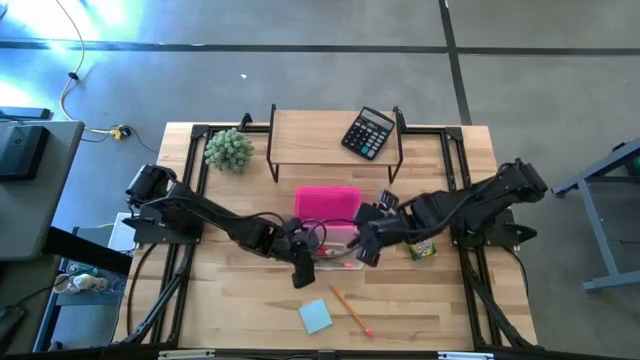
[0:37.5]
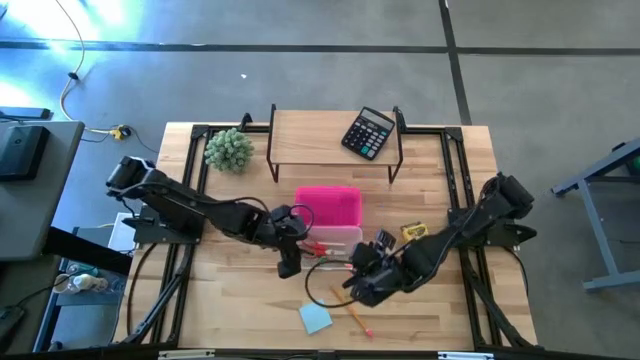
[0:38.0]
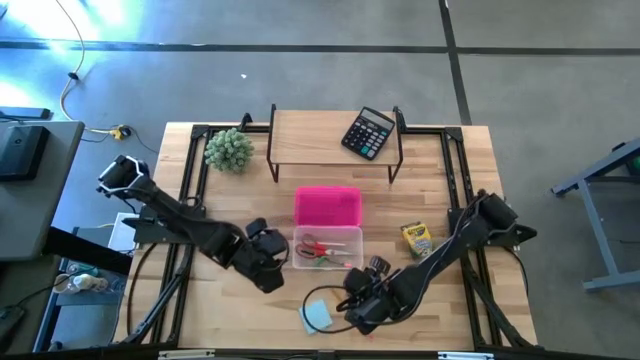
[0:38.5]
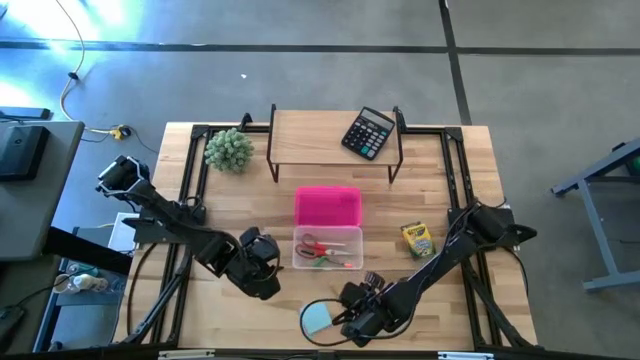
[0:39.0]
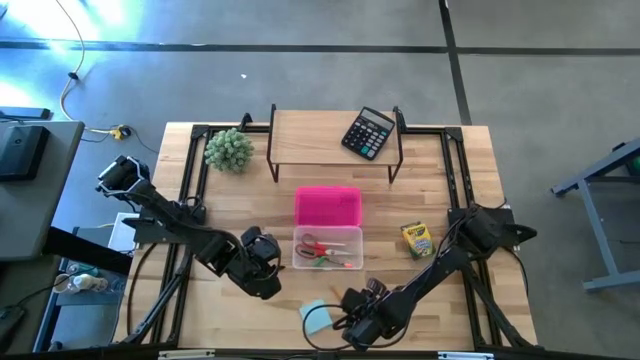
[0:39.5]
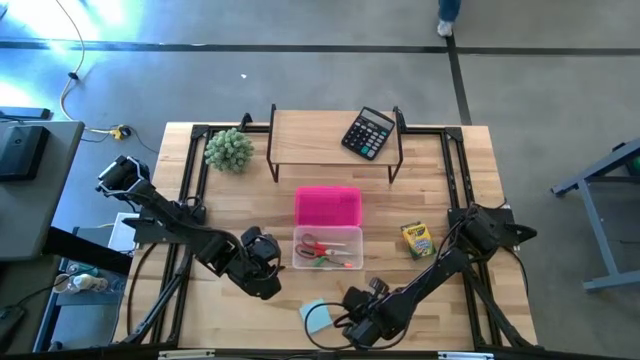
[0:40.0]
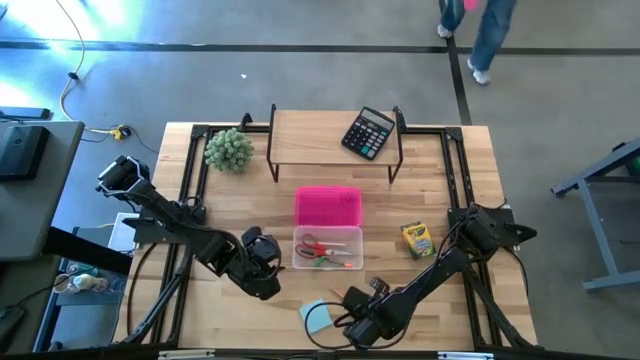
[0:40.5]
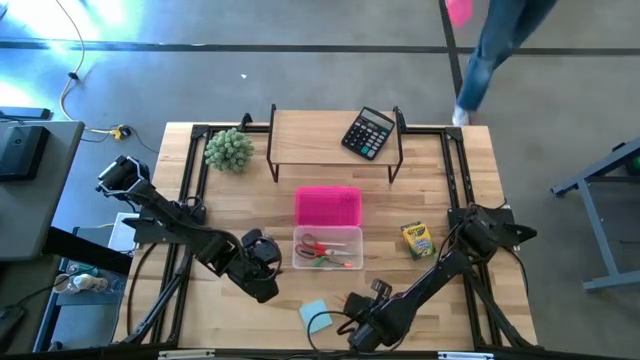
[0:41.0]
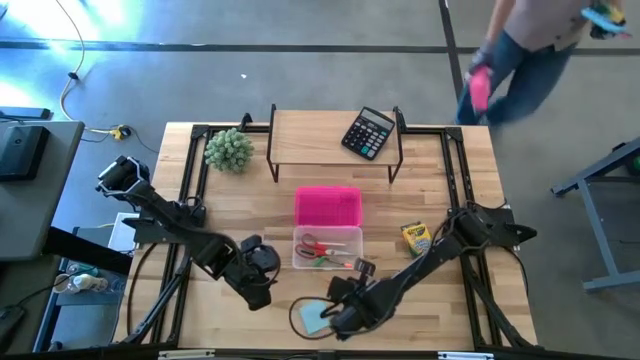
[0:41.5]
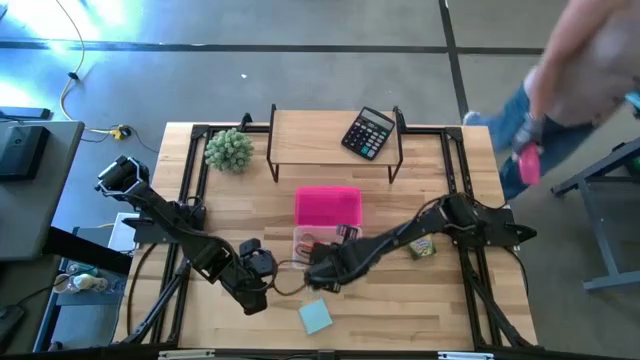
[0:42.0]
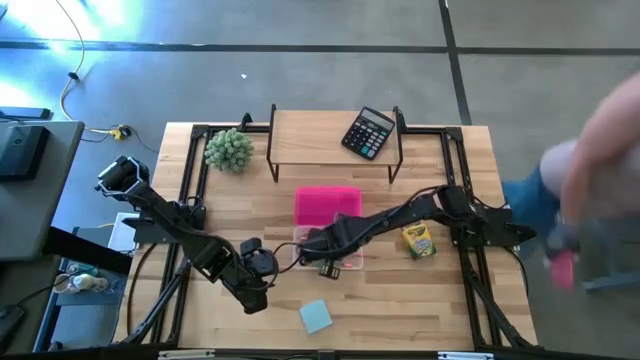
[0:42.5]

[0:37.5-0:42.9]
Task: Pack school essentials
Put the orange pencil into the supply box

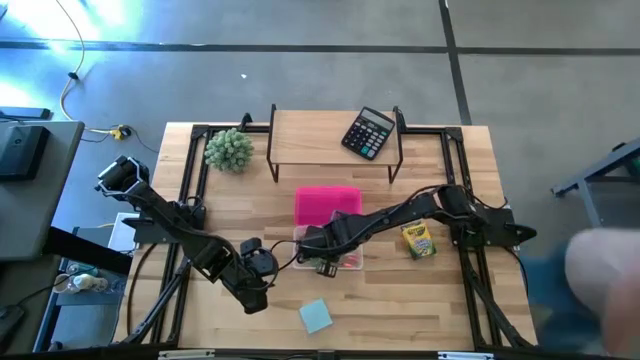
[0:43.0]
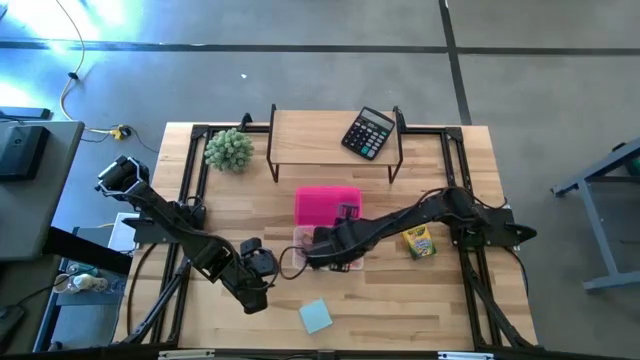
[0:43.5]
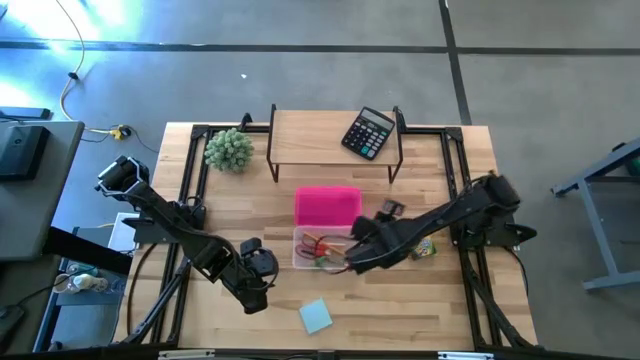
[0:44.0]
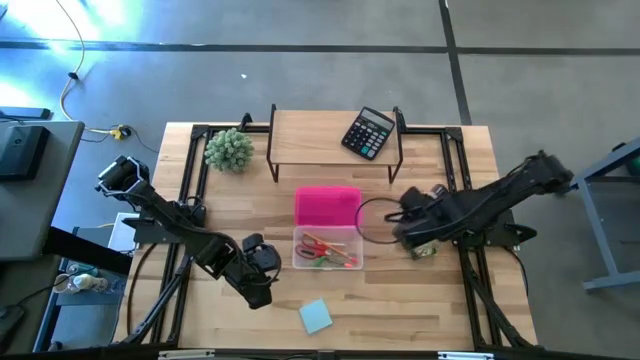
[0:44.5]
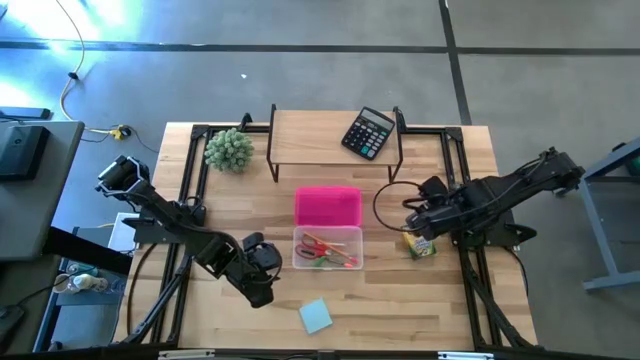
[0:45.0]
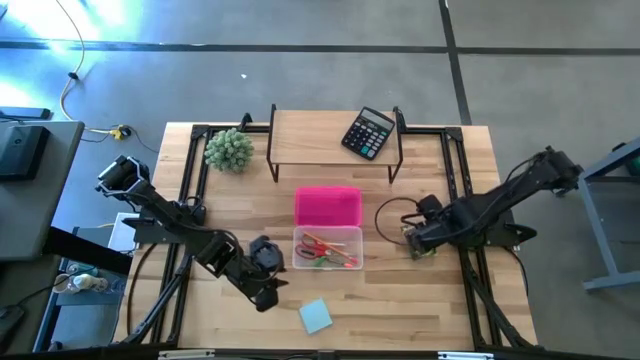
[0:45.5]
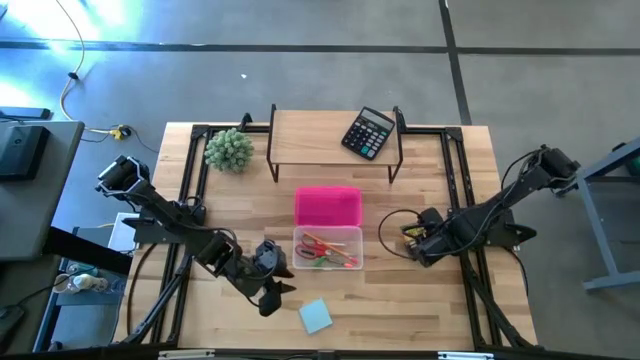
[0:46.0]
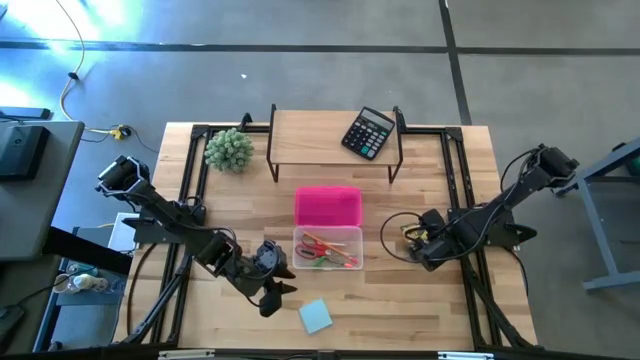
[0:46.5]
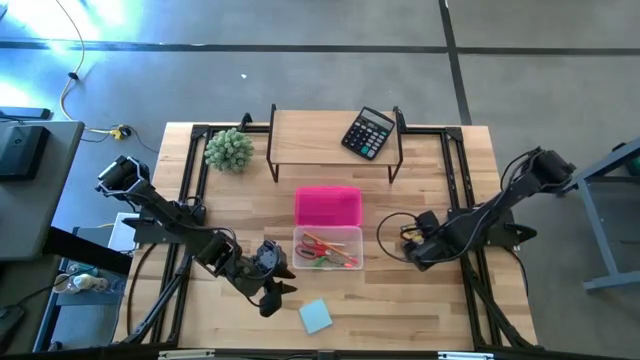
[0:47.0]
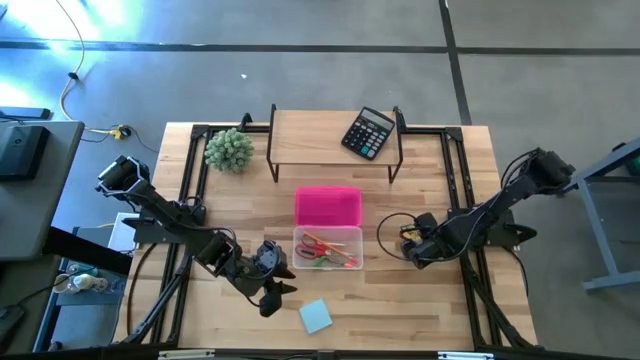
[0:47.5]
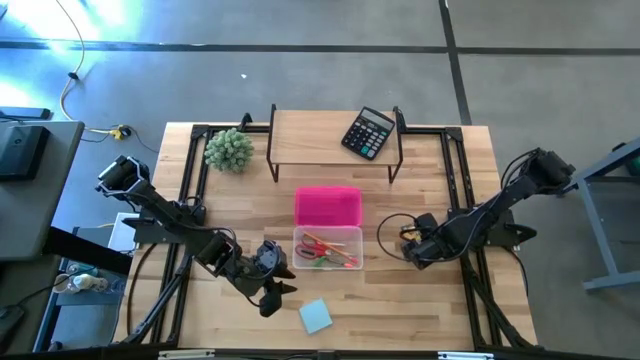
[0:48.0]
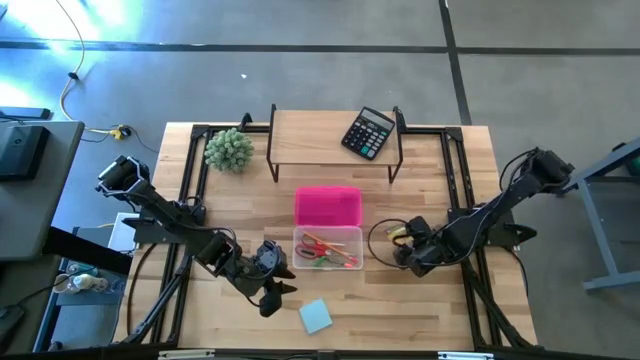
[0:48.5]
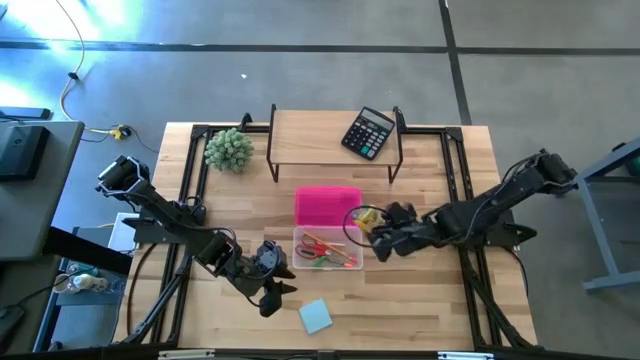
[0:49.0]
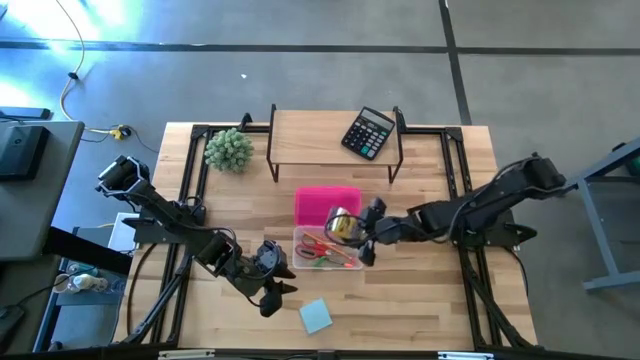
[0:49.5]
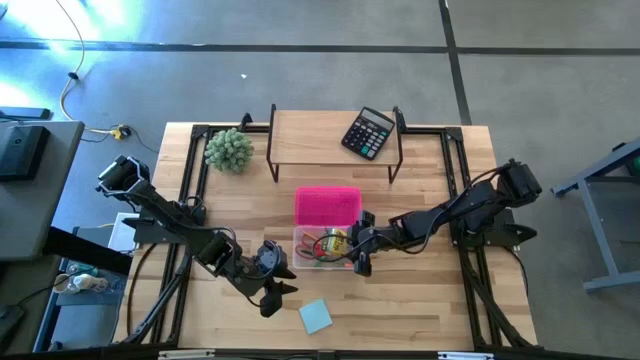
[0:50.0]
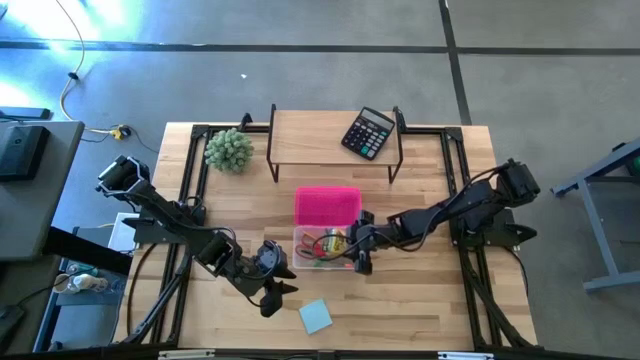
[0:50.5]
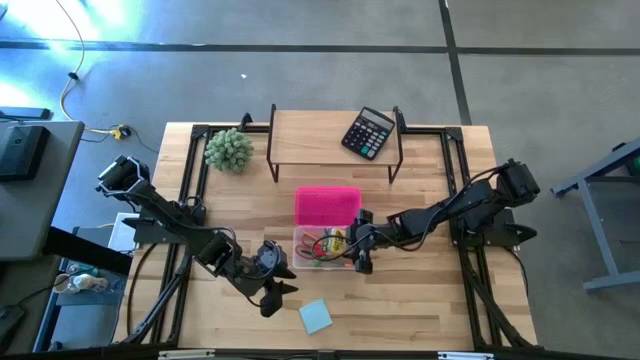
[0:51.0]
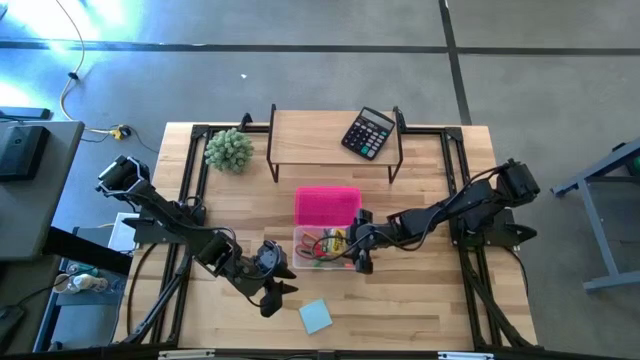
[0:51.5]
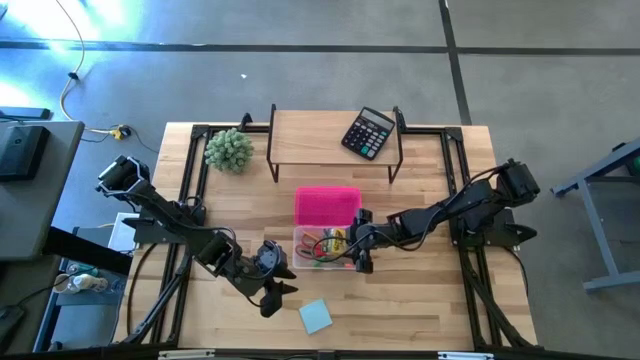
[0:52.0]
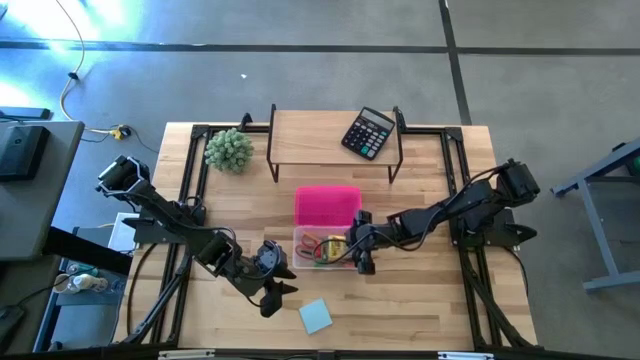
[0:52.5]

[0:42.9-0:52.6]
Put the crayon box into the supply box

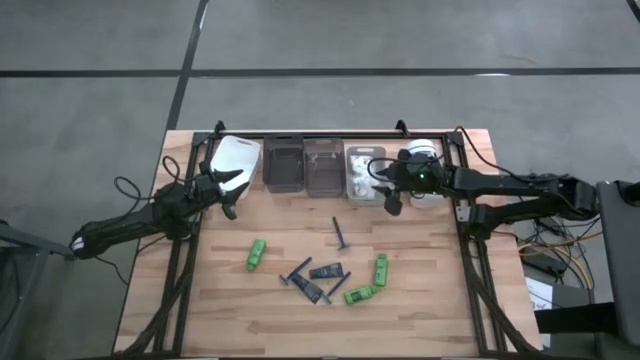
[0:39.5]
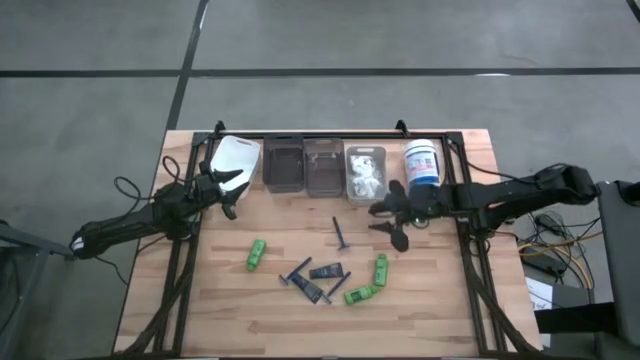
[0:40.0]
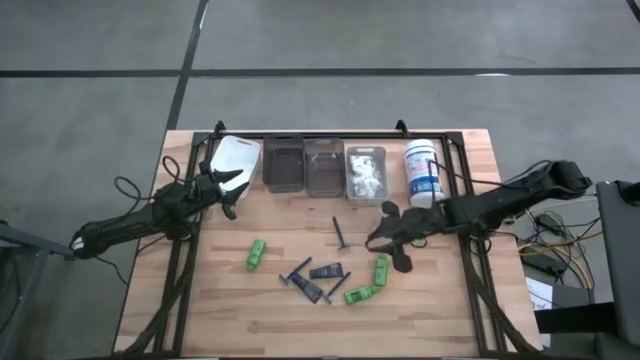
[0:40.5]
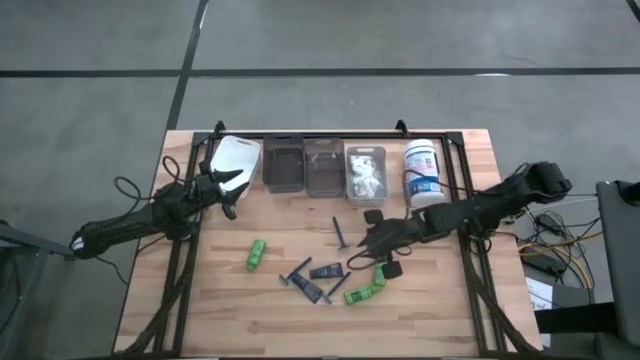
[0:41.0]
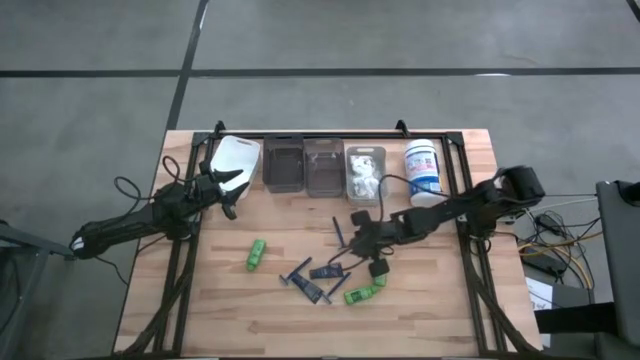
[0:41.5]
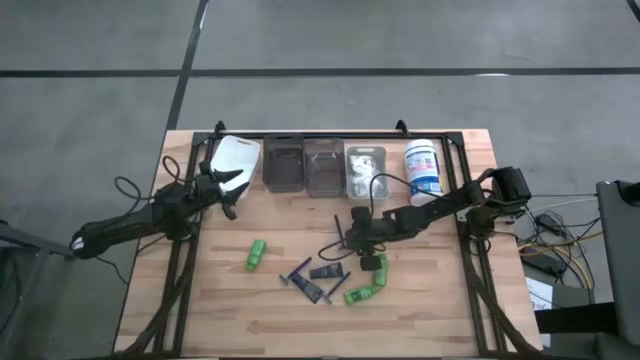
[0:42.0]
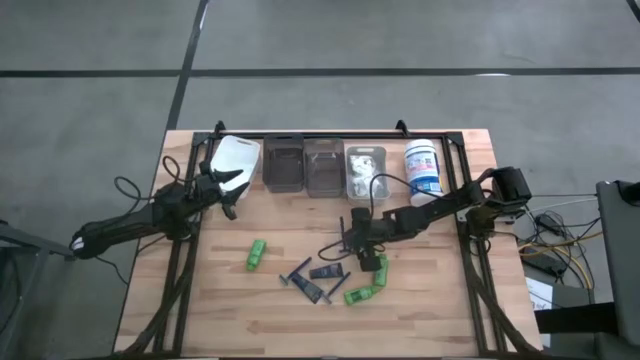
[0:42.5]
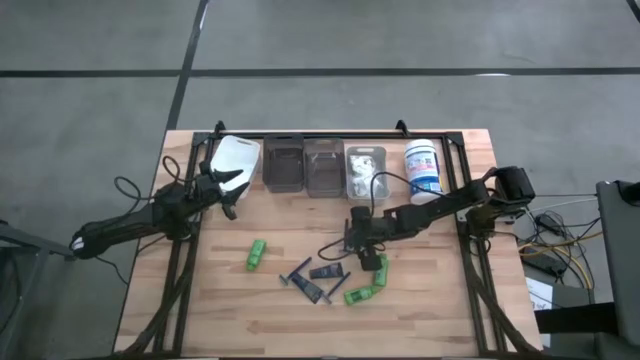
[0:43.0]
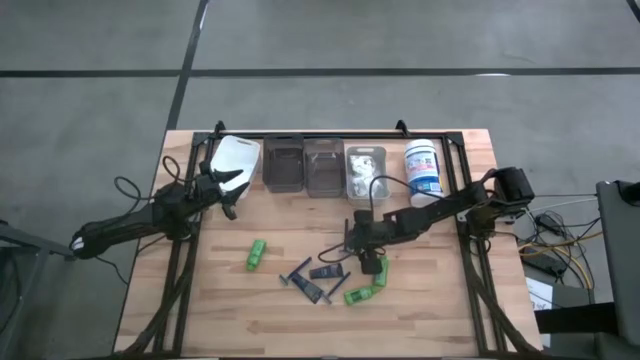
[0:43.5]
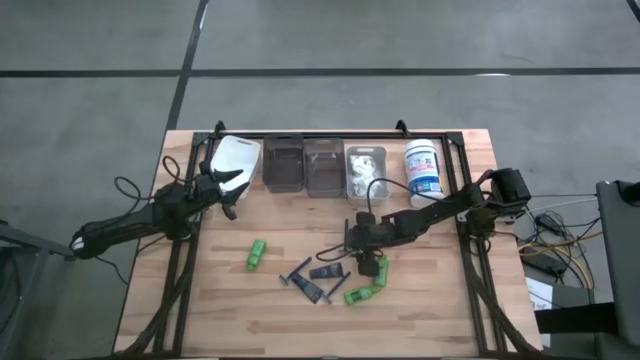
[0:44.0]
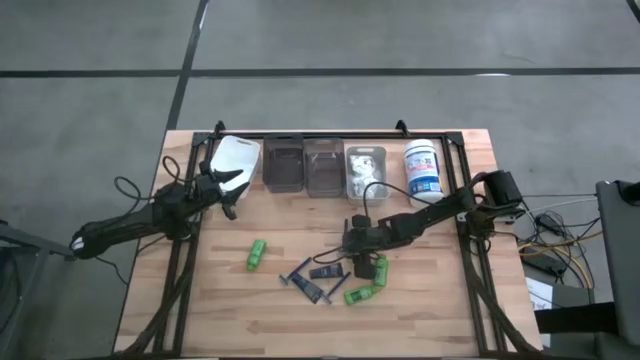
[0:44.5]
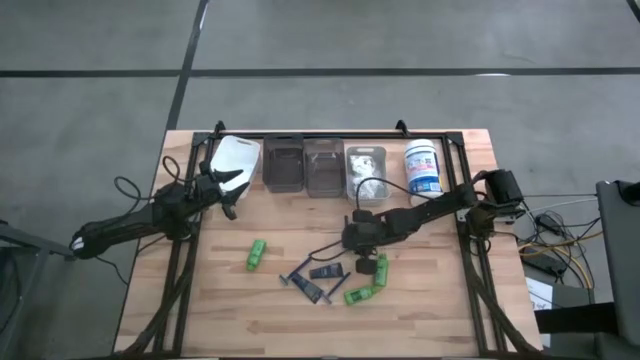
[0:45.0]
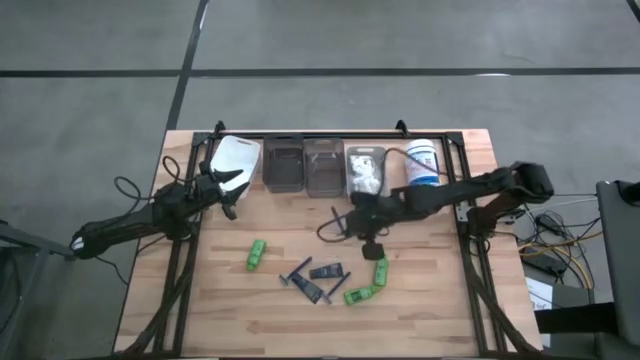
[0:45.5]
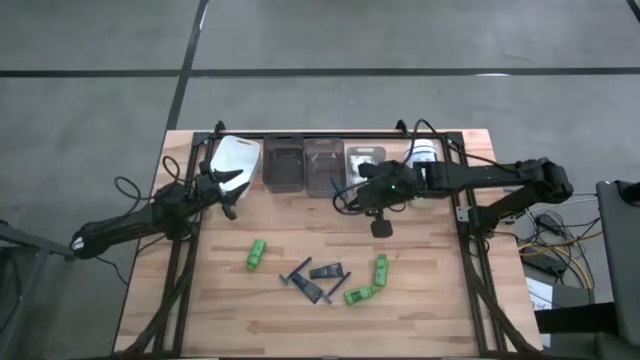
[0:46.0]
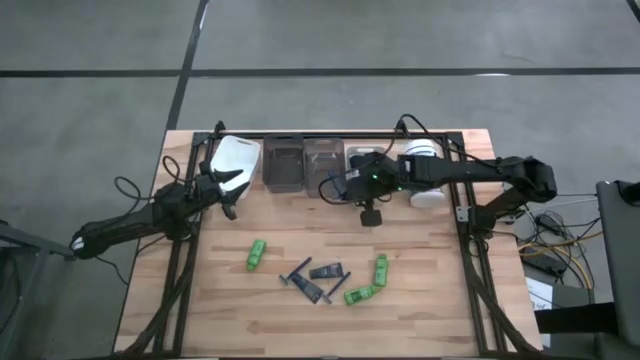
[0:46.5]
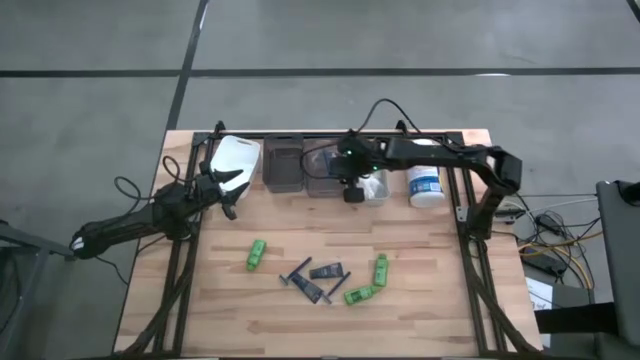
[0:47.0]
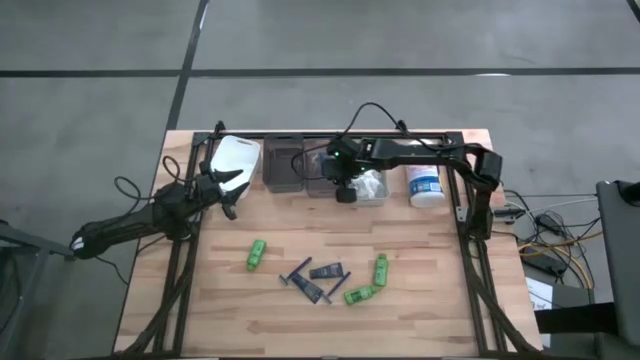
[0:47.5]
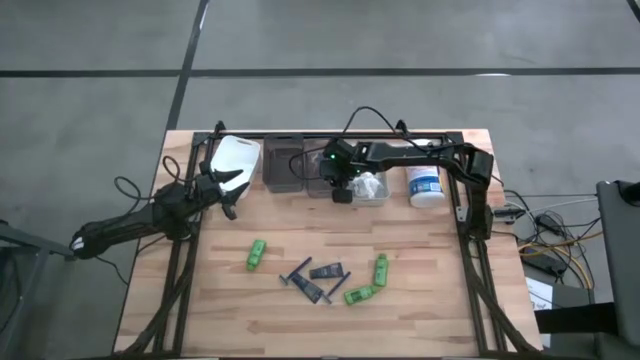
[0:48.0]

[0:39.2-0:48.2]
Task: Pick & Place Travel size toiletries
Put the top razor into the right black bin
